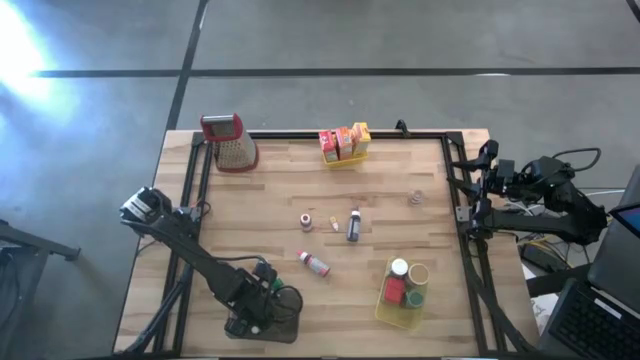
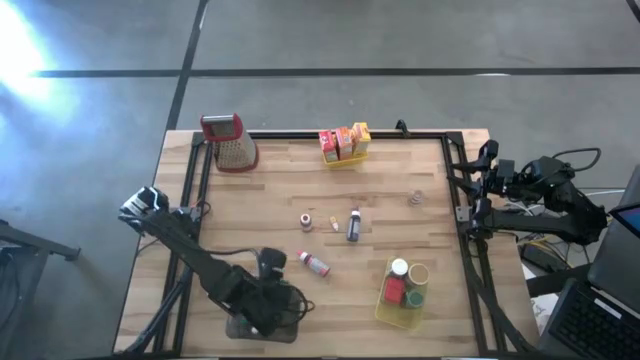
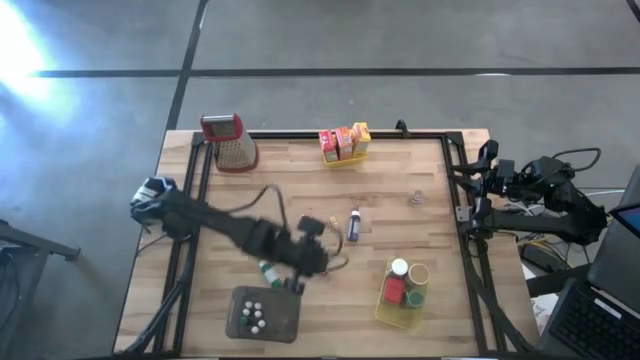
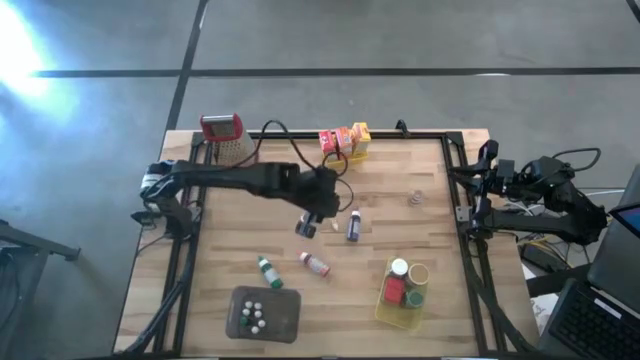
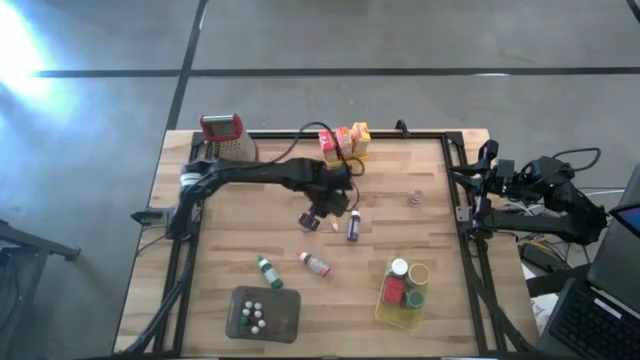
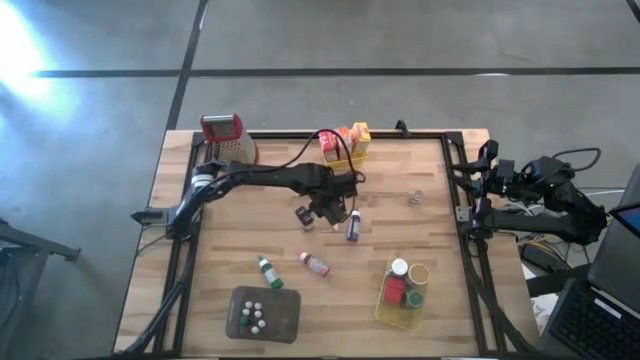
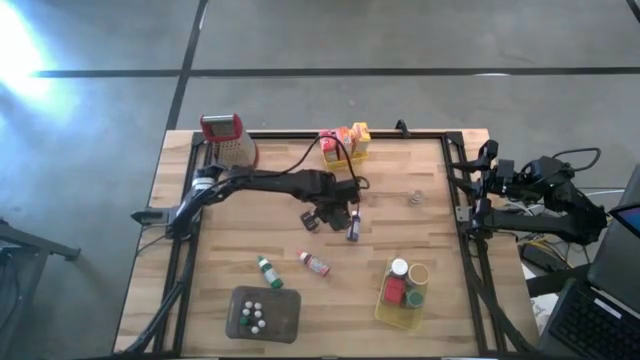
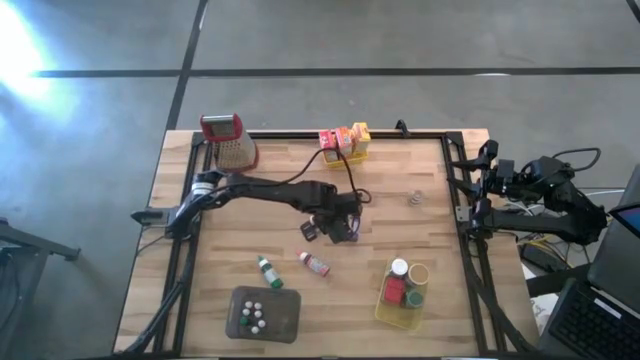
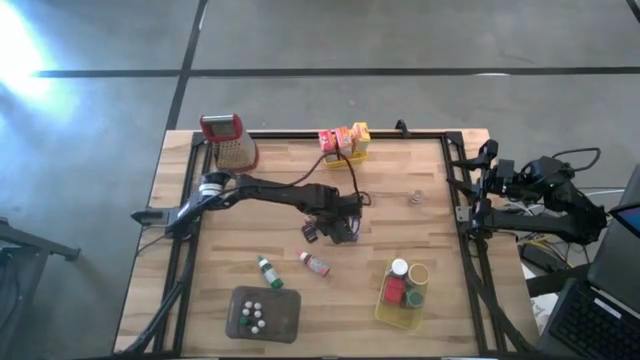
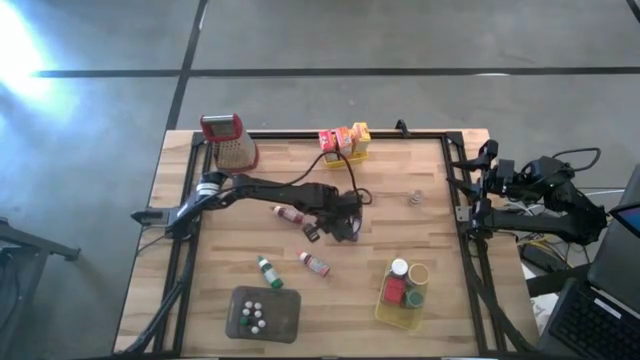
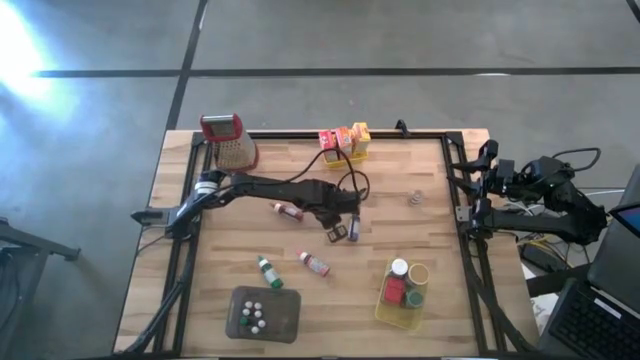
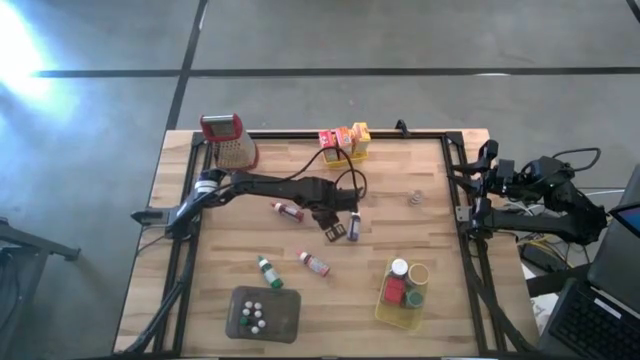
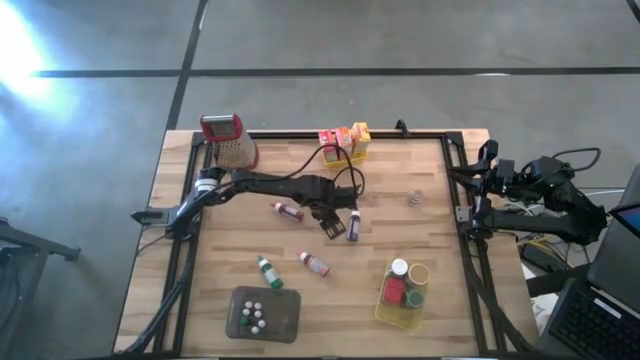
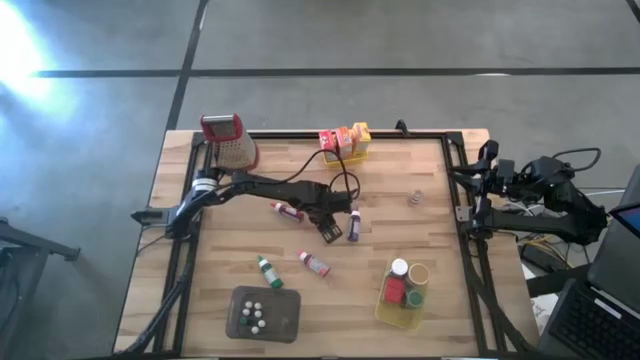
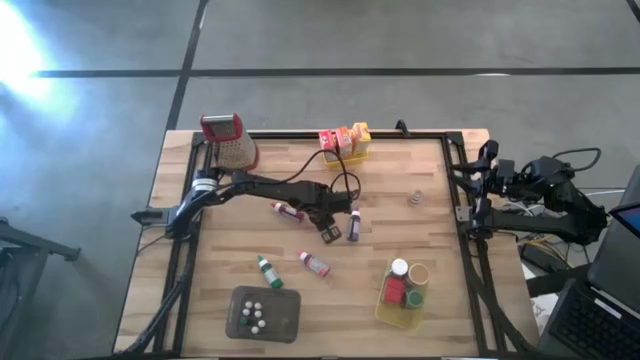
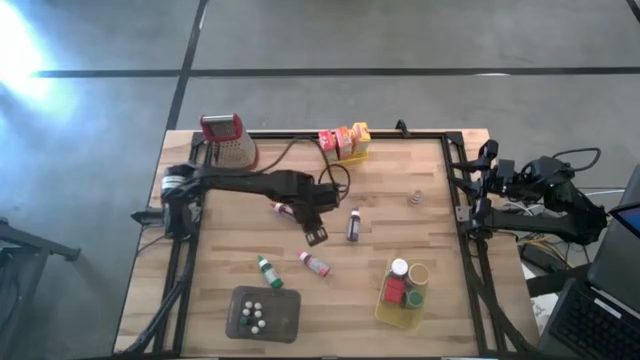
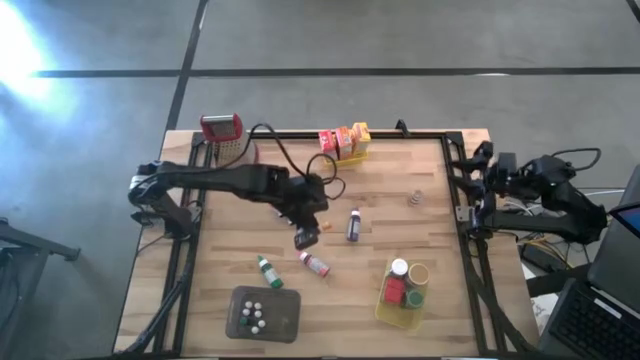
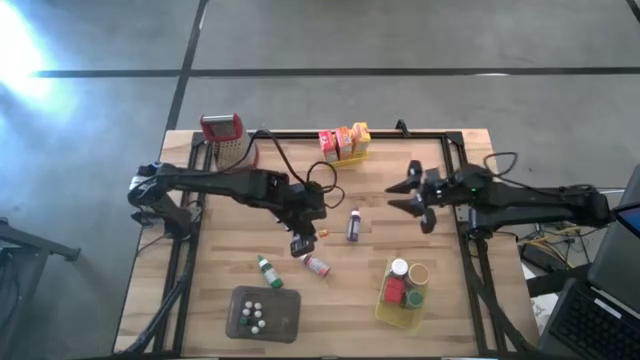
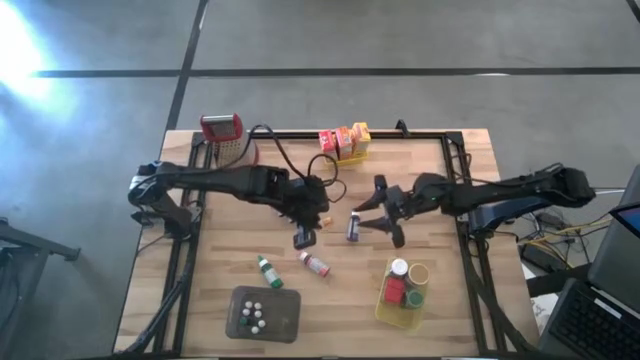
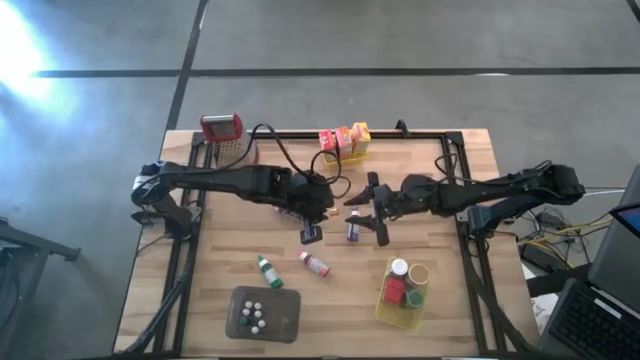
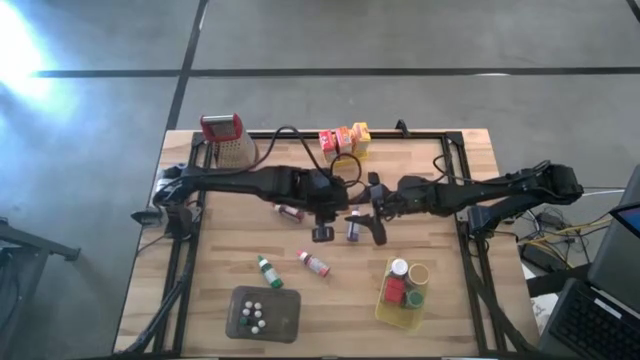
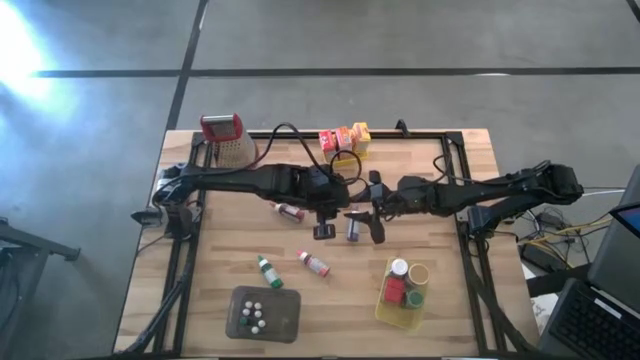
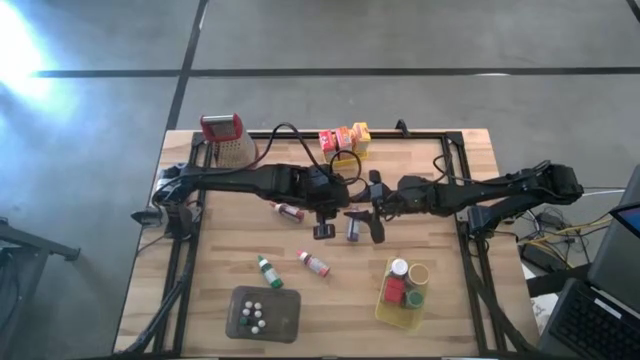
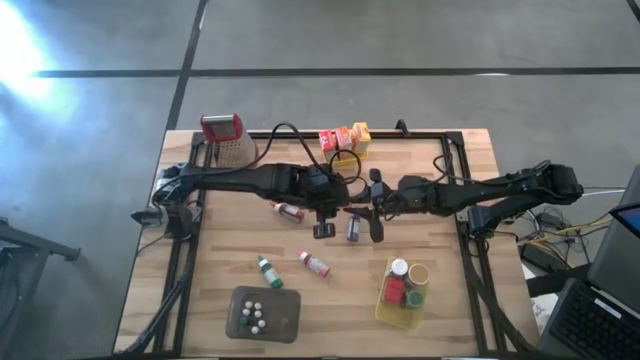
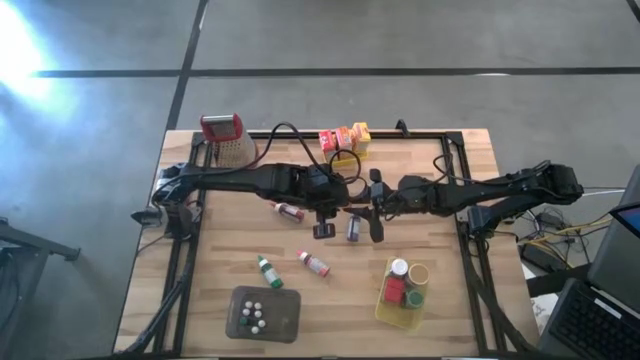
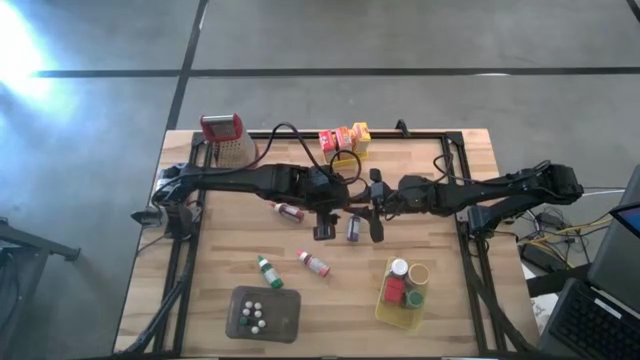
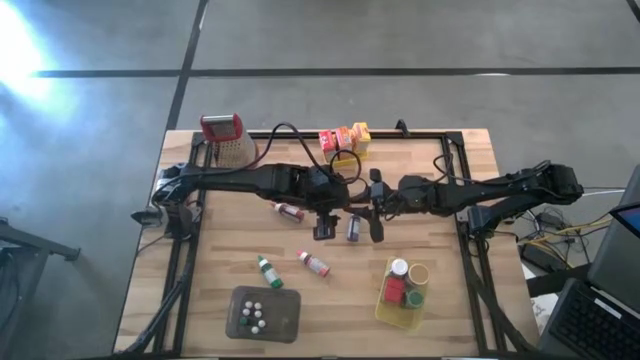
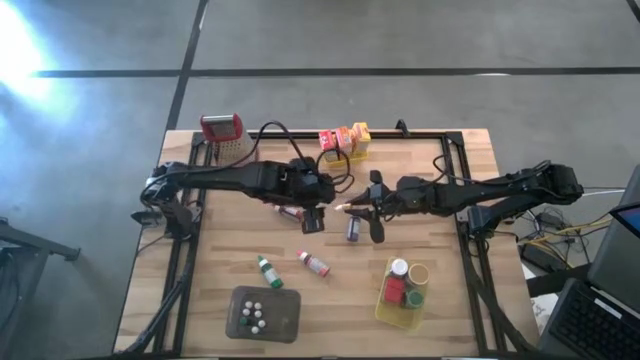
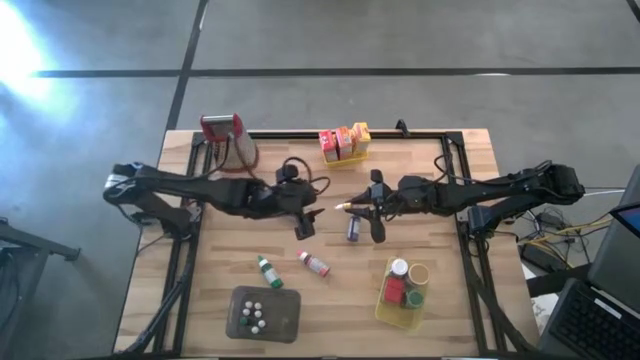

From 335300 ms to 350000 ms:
Task: Pick & Place Kitchen Items
Put the orange food coloring bottle into the black bin

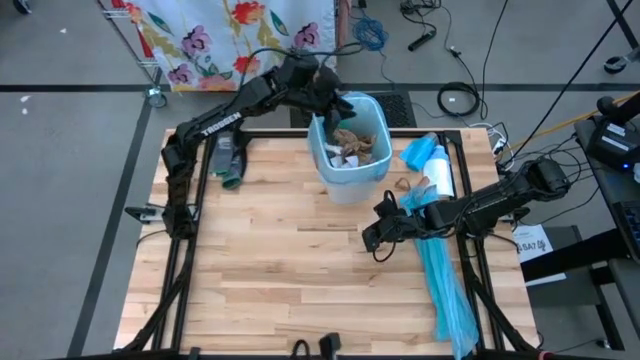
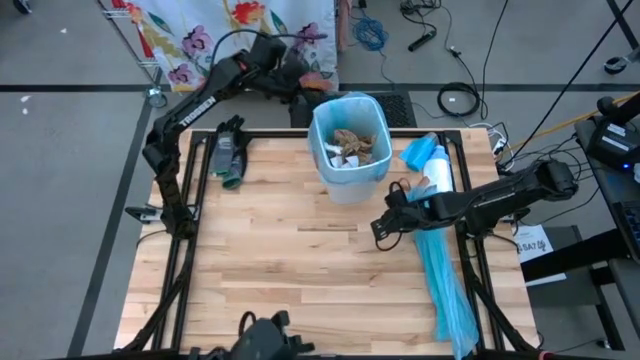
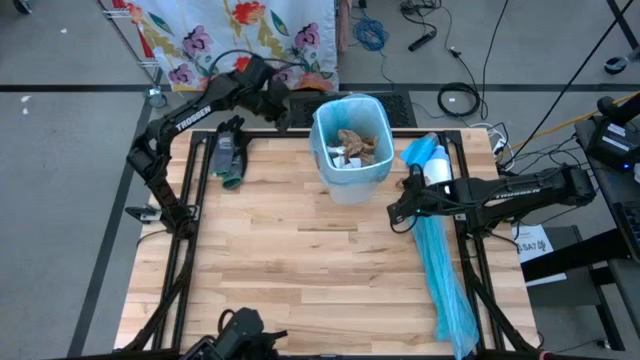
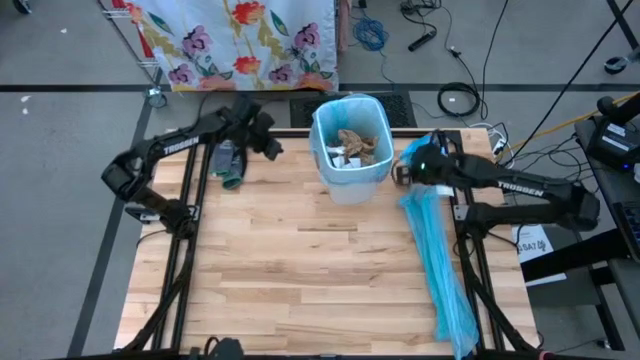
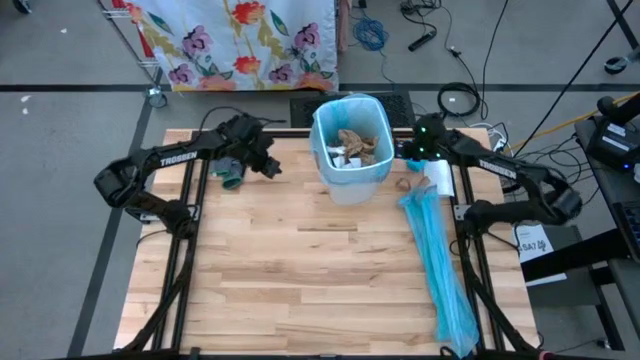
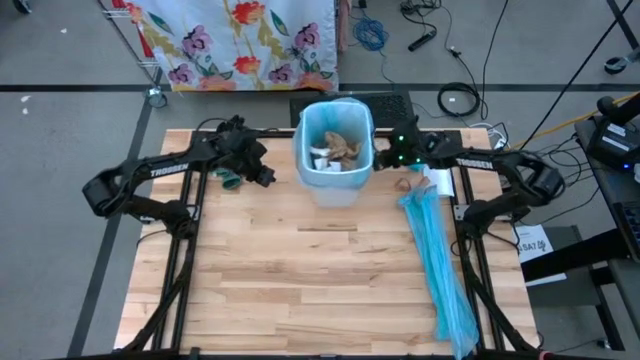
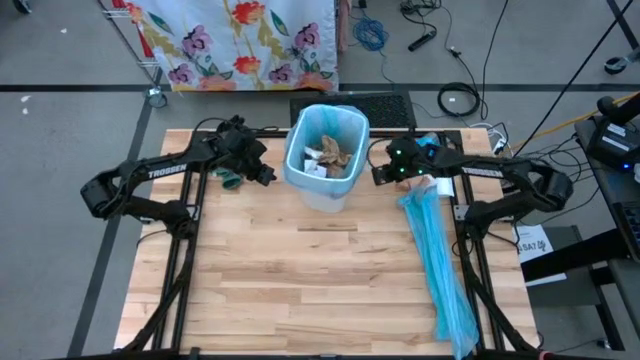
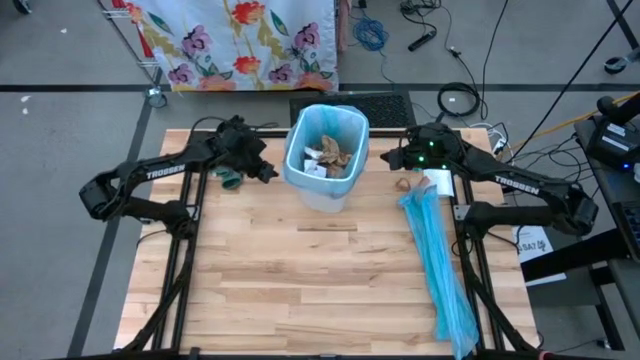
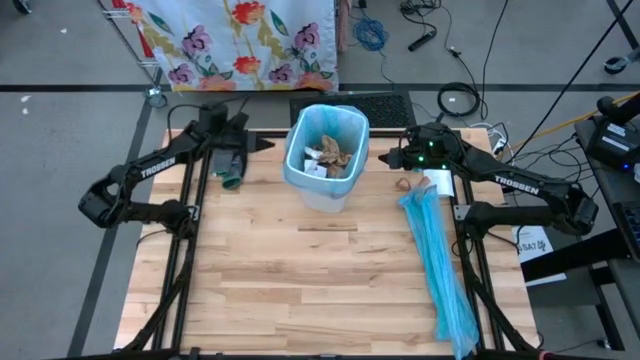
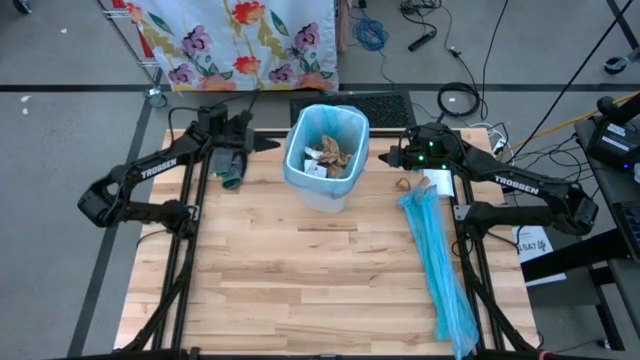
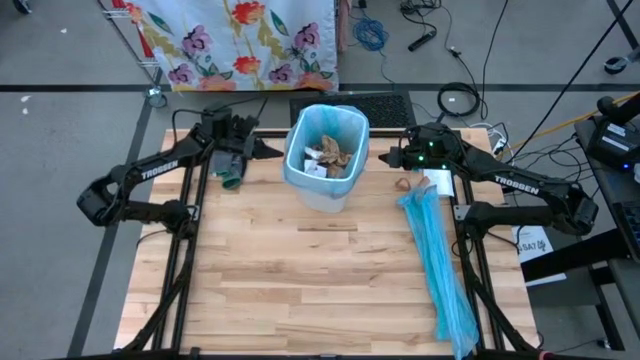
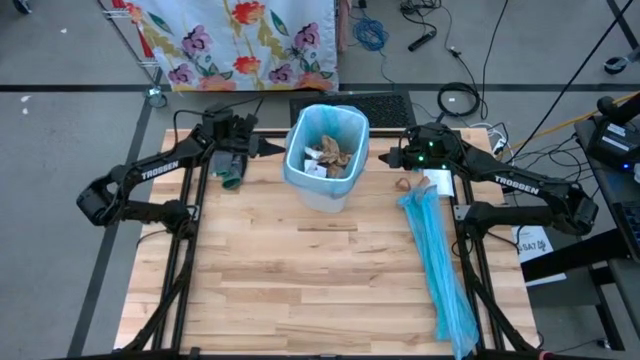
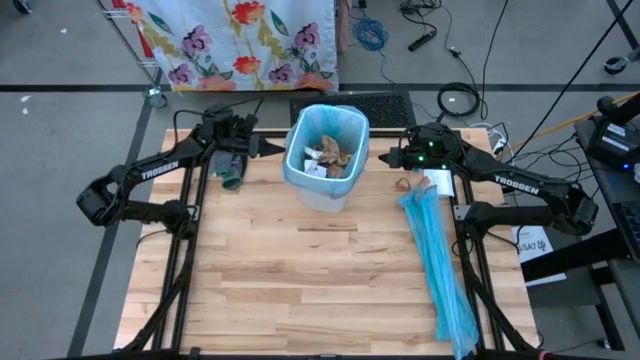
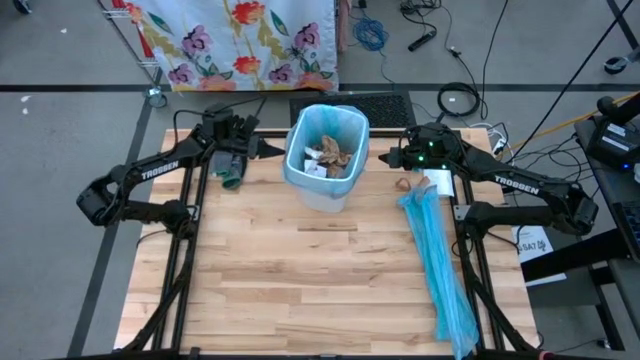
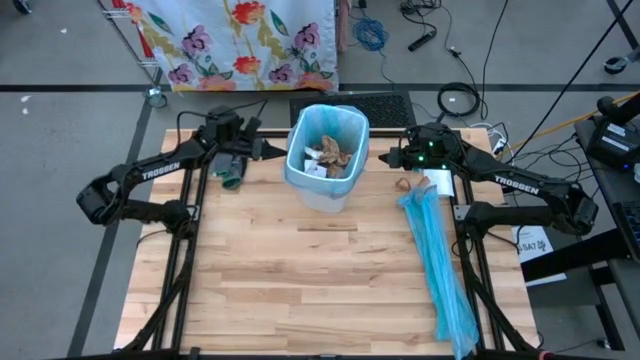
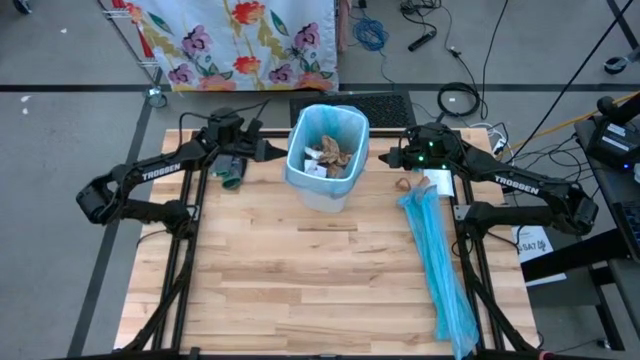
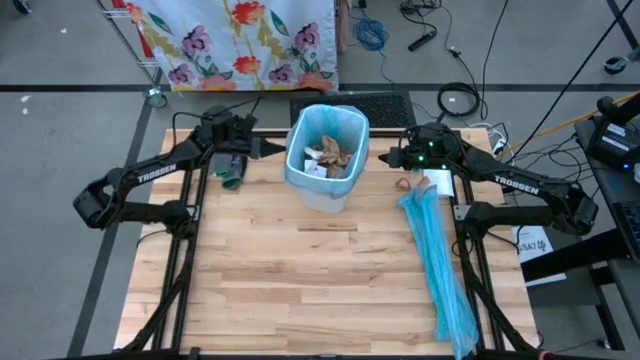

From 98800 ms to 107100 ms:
Task: place trash/remove bag and relplace
Remove the blue trash bag from the trash bin
